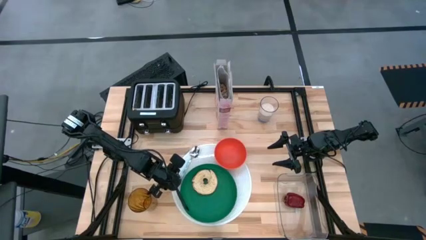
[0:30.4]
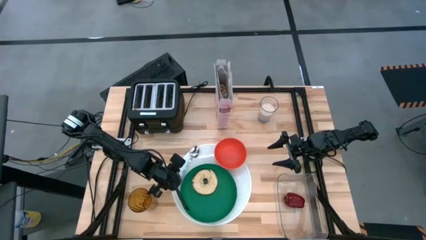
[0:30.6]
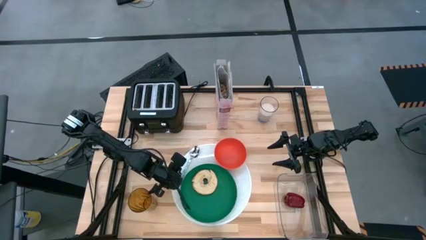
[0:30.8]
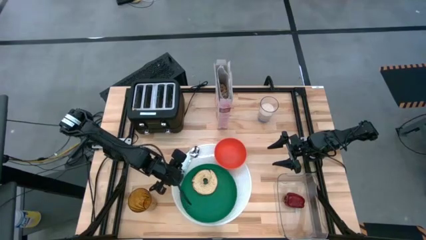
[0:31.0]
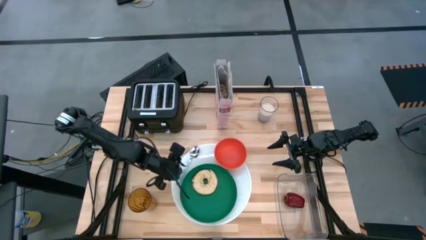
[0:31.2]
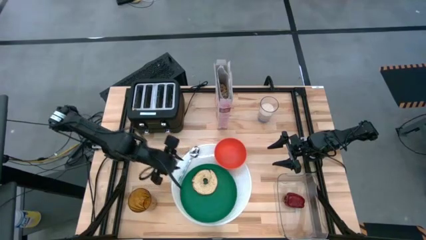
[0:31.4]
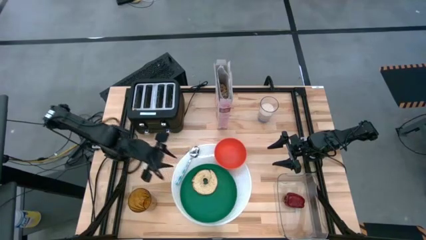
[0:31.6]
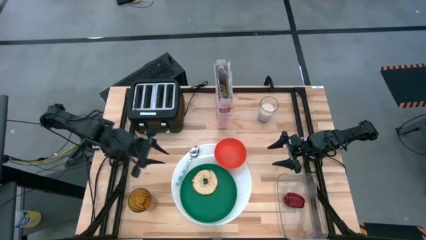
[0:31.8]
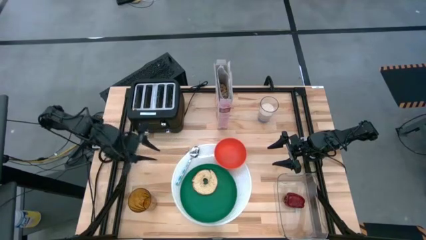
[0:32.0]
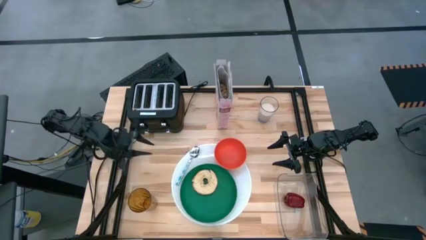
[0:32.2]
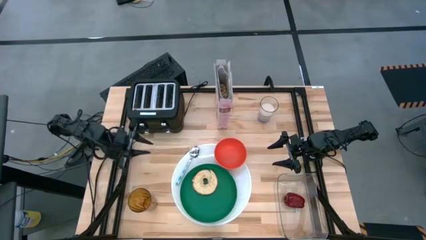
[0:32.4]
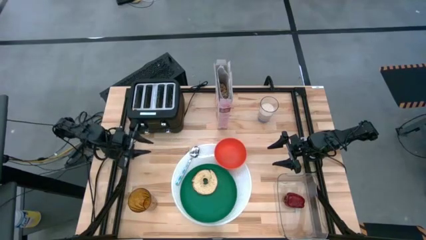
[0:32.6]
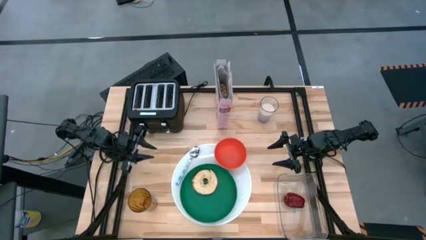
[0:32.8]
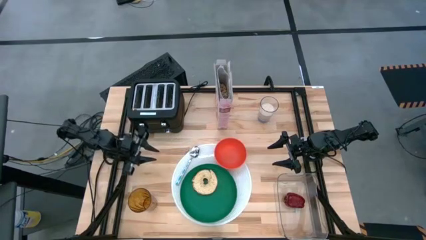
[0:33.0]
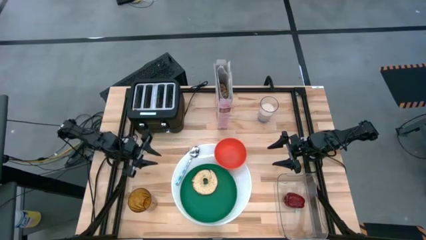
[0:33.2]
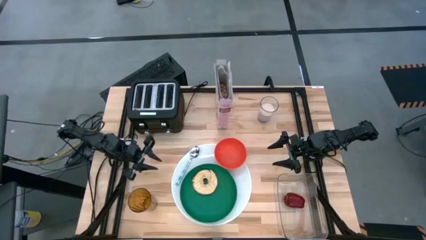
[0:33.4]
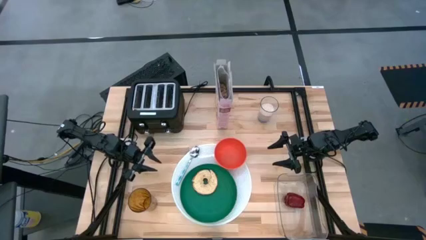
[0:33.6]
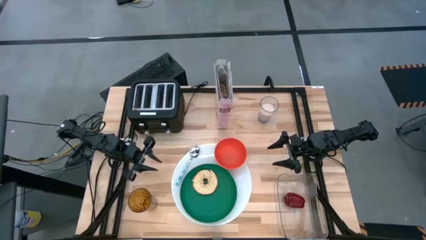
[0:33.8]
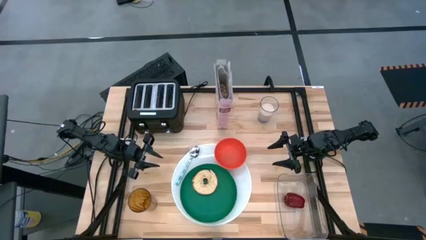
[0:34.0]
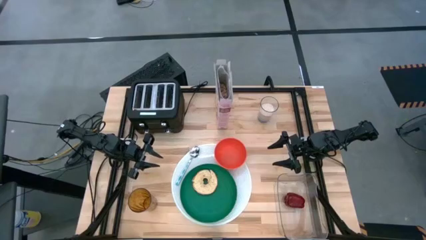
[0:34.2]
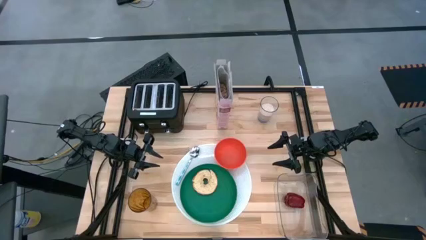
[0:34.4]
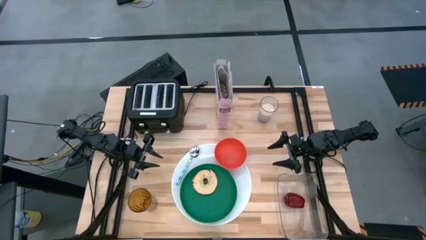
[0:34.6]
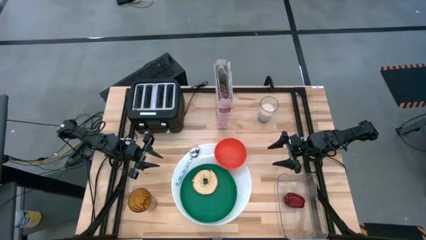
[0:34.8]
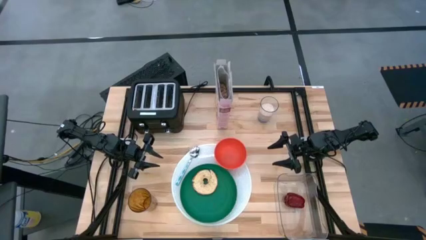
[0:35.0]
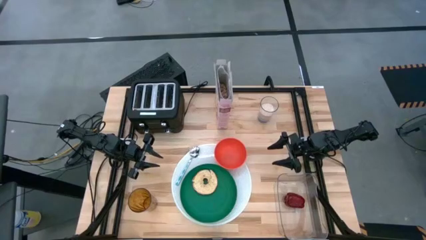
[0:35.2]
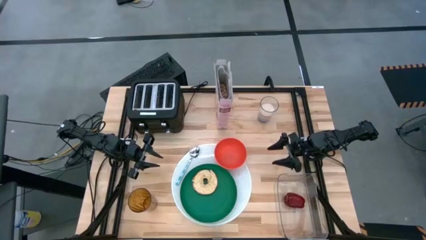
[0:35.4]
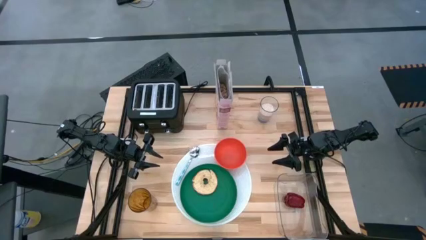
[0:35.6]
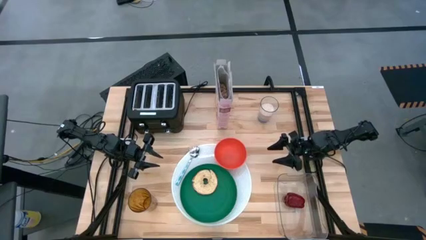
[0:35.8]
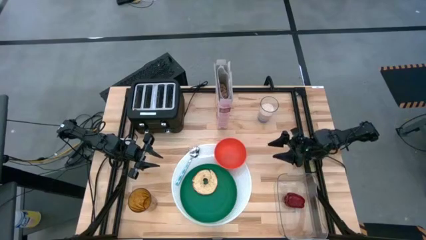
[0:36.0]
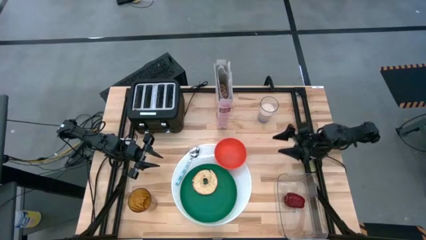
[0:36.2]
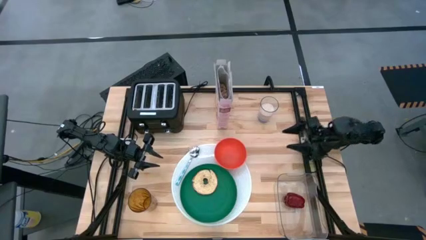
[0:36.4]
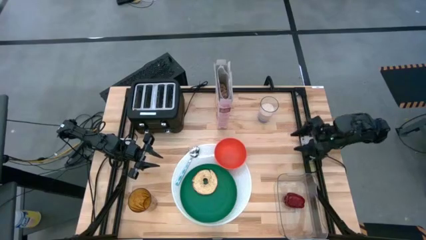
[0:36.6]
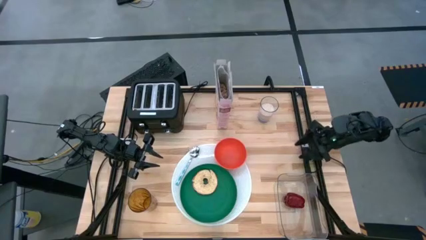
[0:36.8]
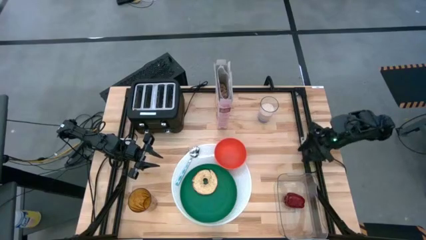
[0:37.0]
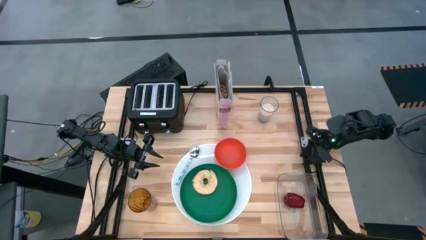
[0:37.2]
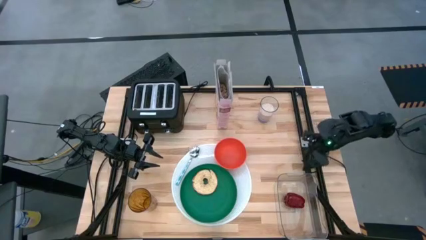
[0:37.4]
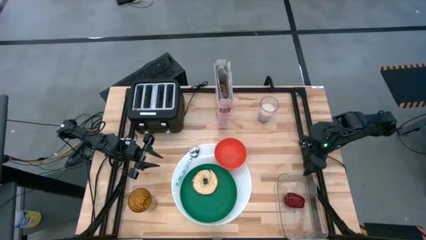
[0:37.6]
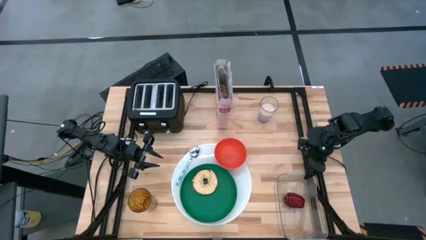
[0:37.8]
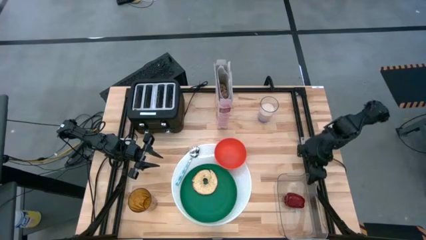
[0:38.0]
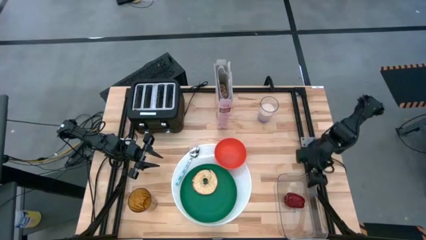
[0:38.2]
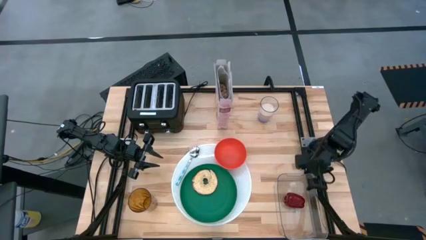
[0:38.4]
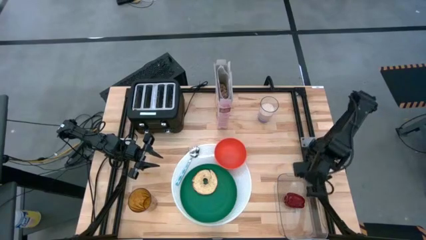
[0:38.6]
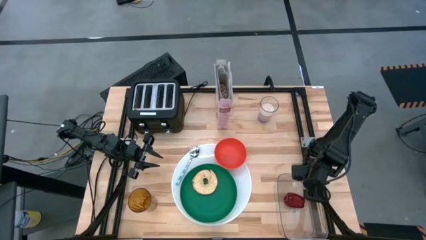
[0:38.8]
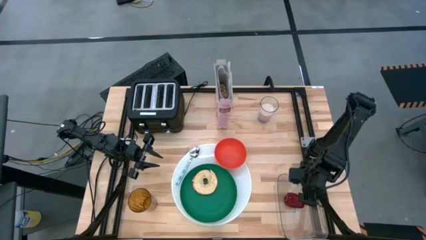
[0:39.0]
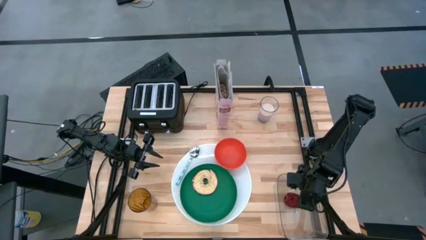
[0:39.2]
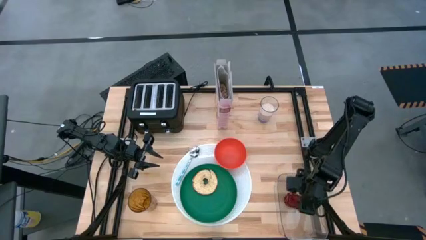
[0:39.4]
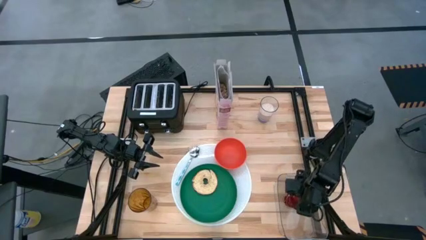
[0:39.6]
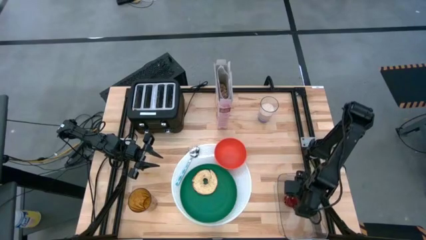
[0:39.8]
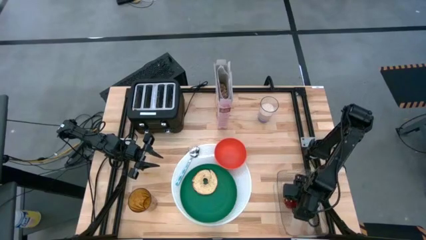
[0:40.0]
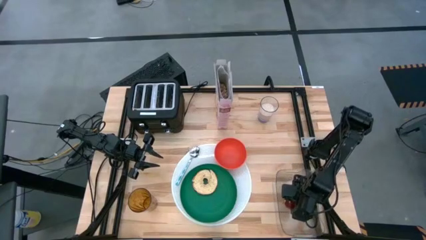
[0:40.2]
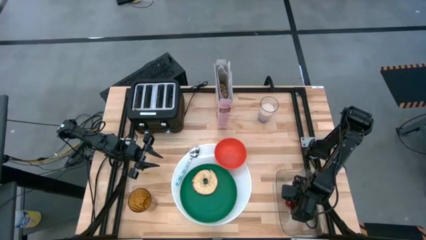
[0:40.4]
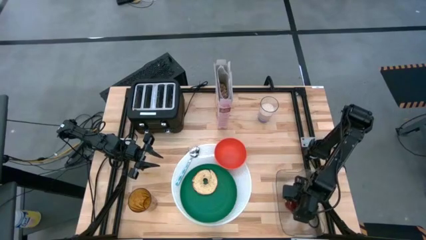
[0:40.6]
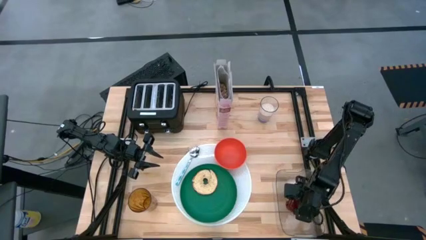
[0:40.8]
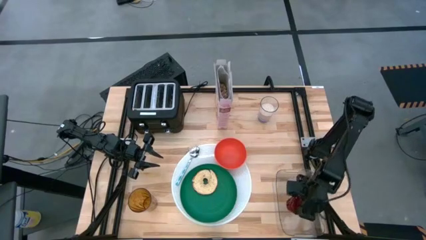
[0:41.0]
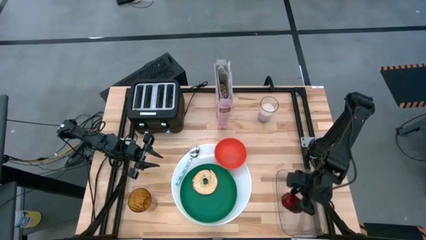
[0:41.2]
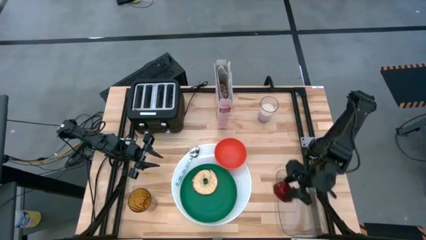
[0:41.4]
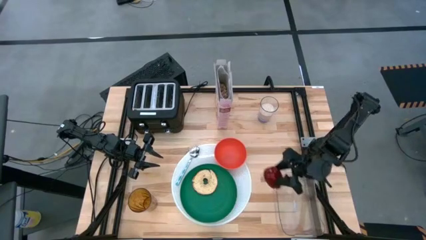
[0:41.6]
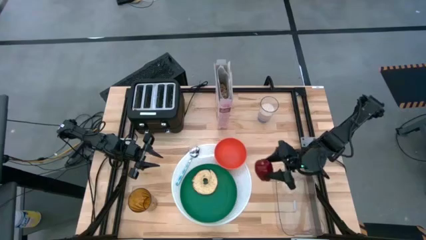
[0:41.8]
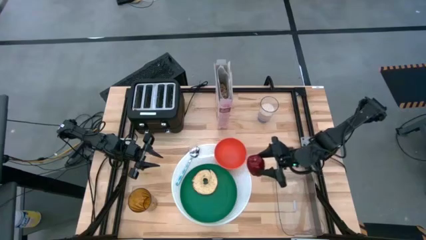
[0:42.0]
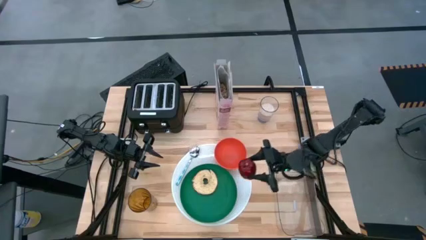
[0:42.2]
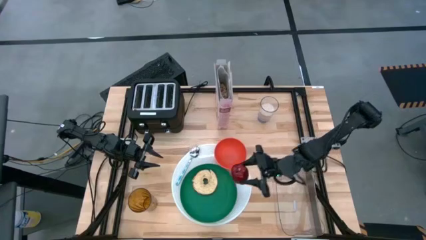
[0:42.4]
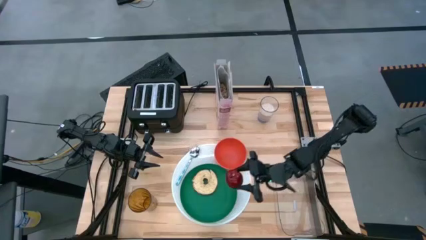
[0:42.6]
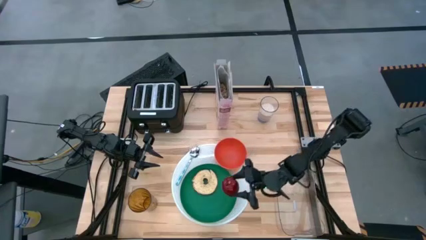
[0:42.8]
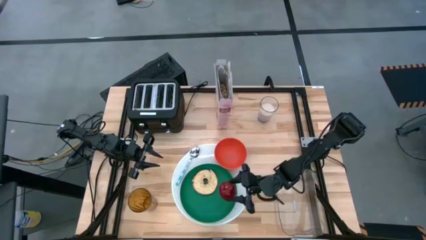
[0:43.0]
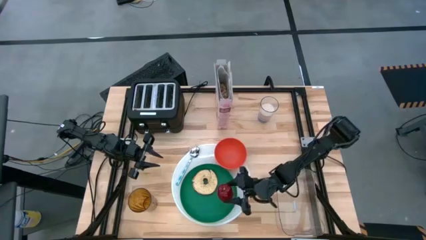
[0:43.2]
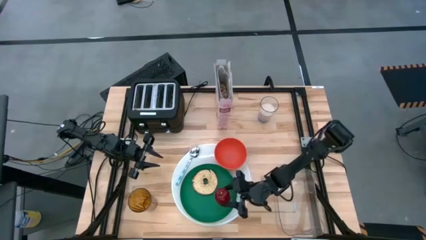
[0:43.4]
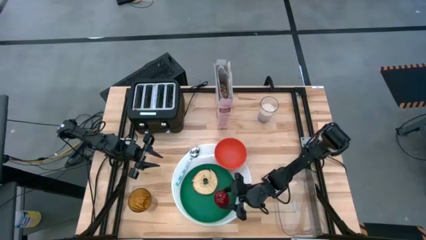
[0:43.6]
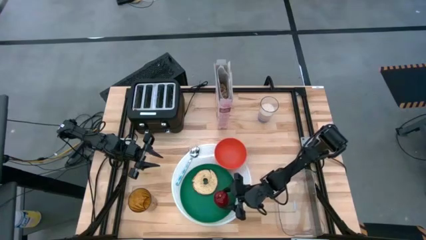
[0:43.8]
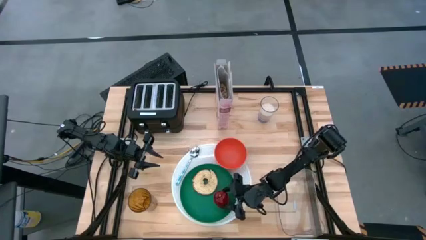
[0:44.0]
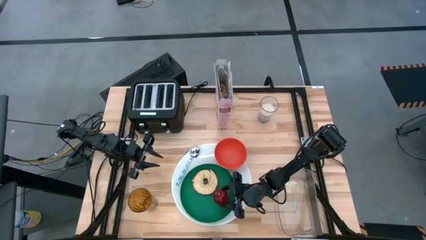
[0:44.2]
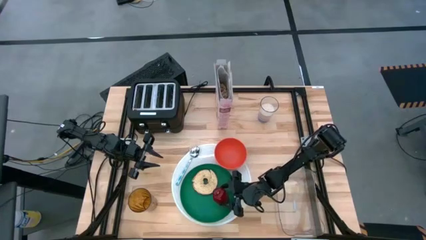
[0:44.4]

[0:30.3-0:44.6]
Task: Arrange a breakfast setting
Put the red apple from the transparent bin into the green plate
